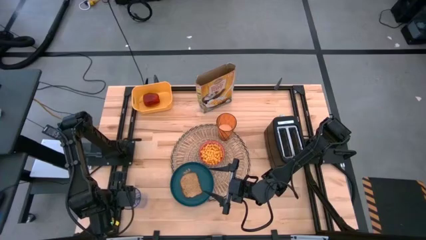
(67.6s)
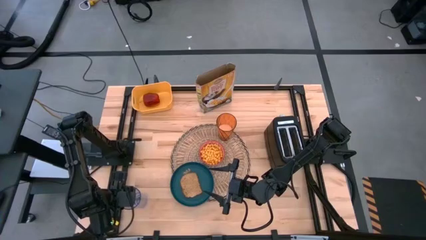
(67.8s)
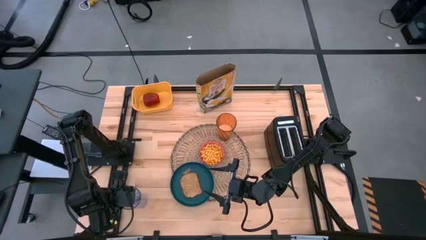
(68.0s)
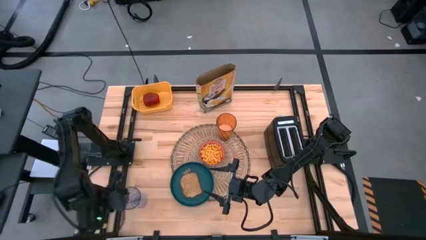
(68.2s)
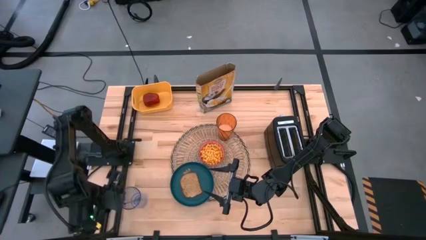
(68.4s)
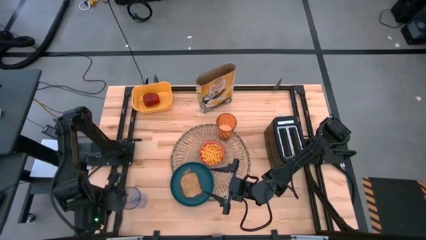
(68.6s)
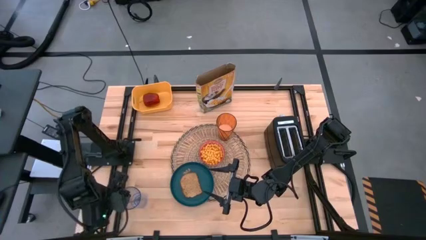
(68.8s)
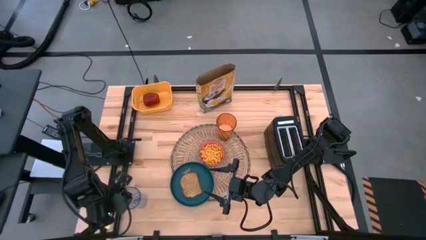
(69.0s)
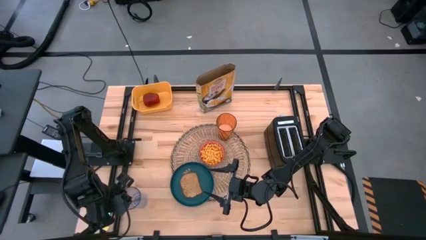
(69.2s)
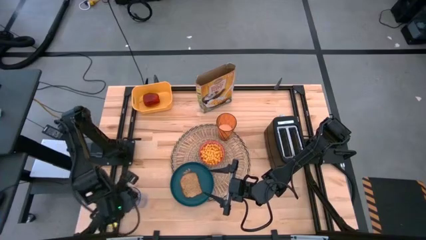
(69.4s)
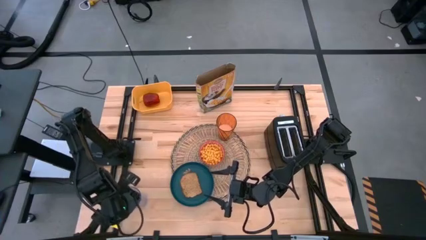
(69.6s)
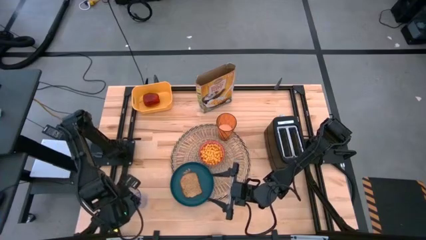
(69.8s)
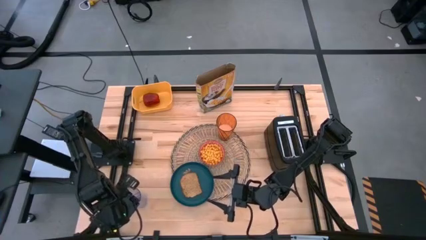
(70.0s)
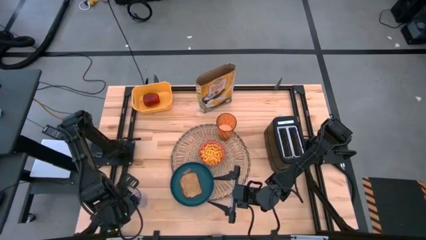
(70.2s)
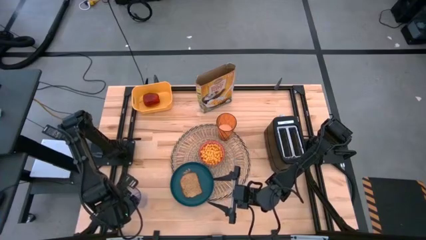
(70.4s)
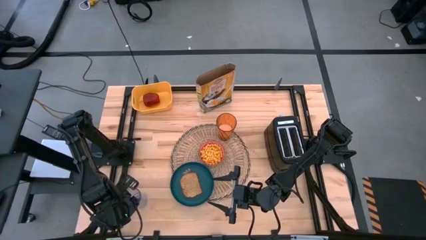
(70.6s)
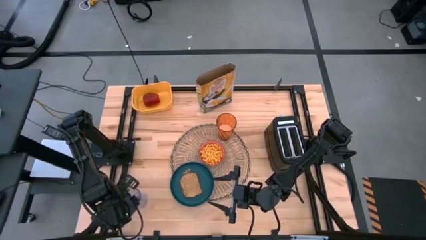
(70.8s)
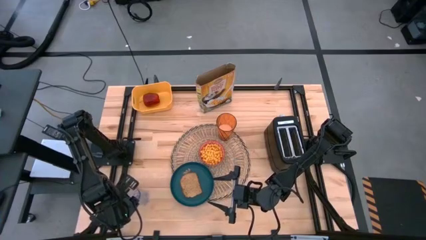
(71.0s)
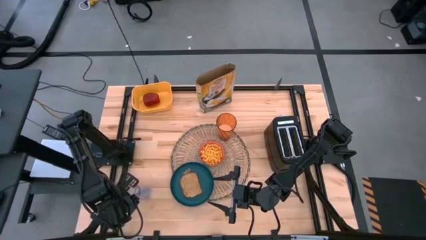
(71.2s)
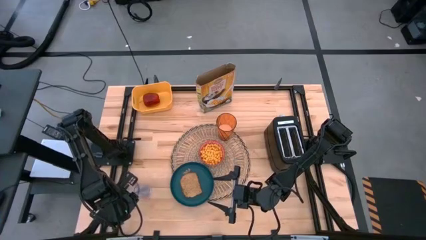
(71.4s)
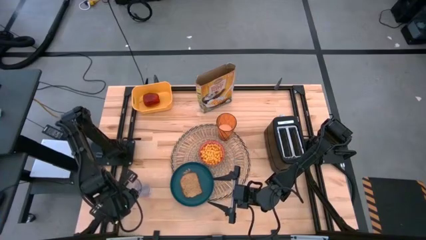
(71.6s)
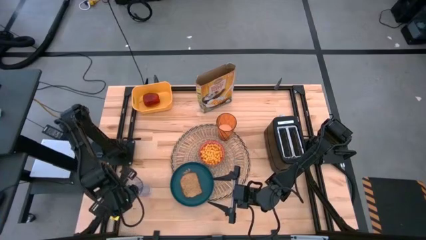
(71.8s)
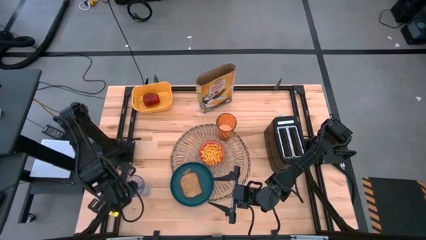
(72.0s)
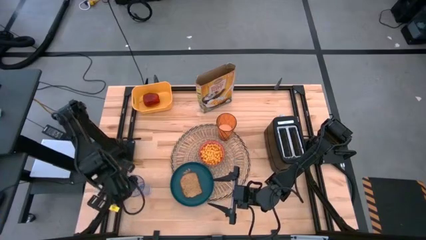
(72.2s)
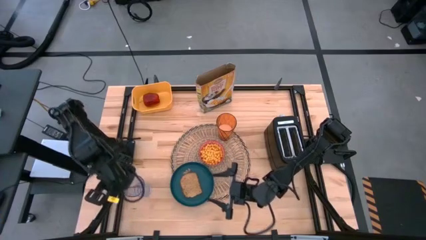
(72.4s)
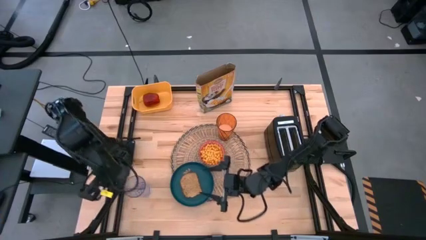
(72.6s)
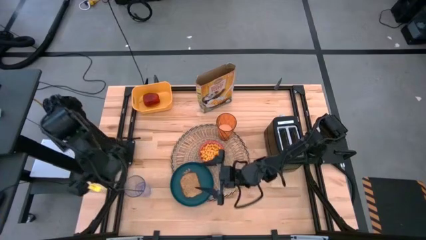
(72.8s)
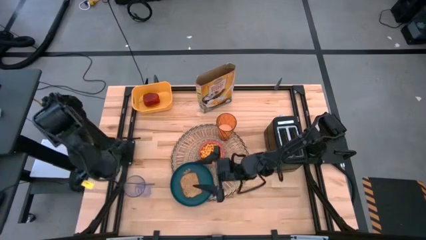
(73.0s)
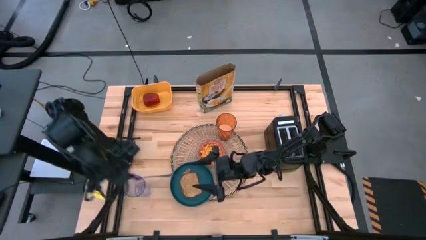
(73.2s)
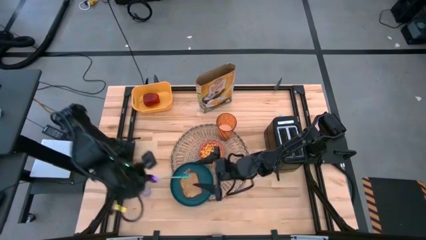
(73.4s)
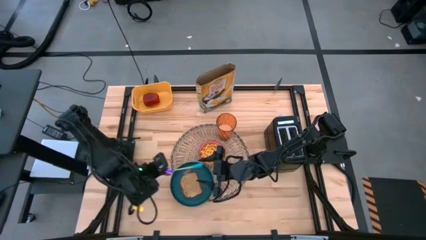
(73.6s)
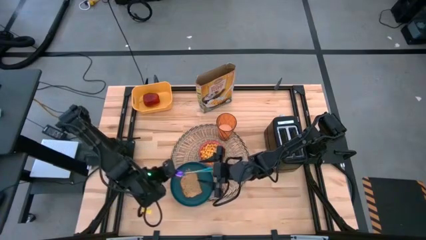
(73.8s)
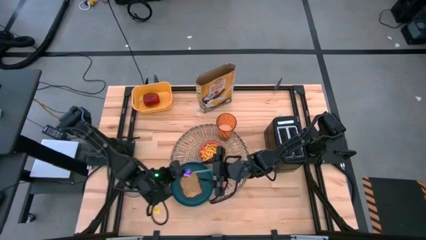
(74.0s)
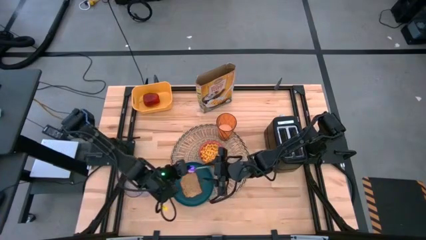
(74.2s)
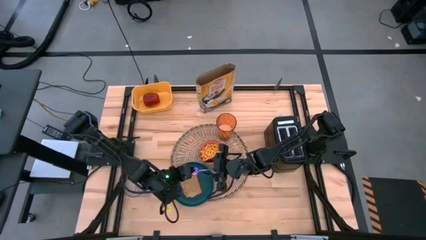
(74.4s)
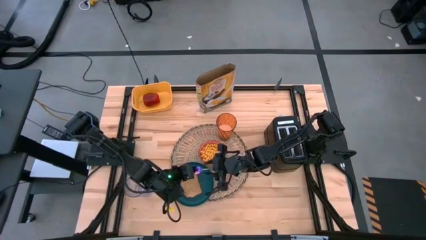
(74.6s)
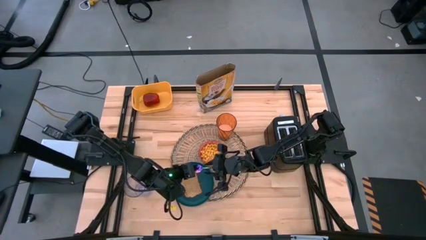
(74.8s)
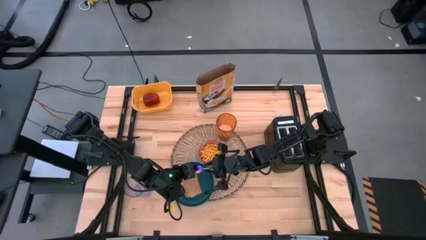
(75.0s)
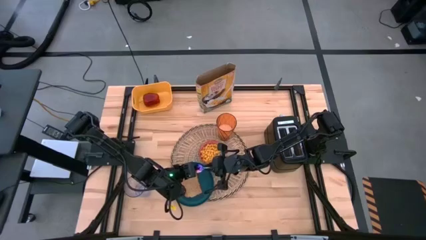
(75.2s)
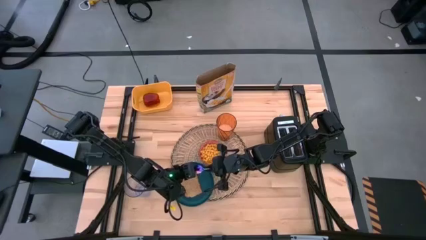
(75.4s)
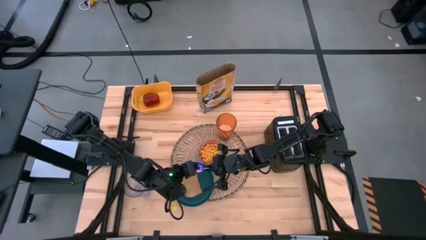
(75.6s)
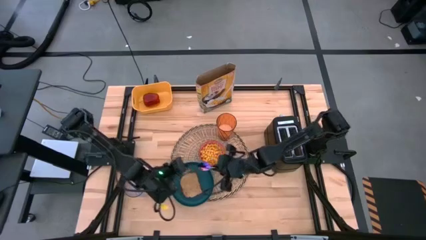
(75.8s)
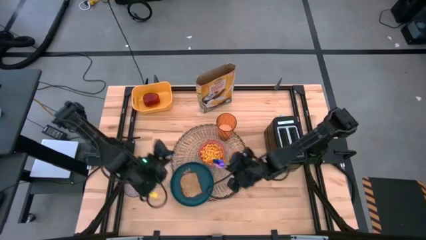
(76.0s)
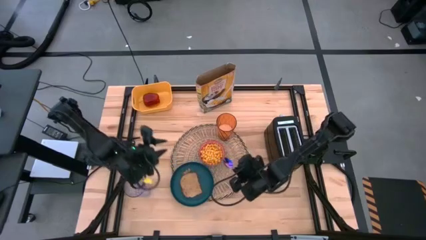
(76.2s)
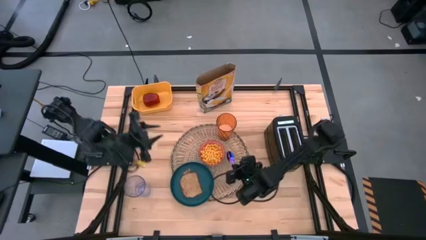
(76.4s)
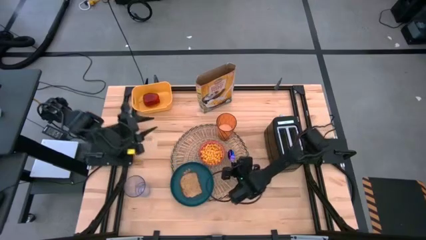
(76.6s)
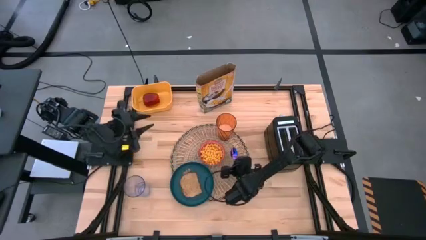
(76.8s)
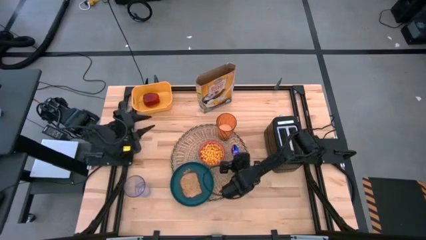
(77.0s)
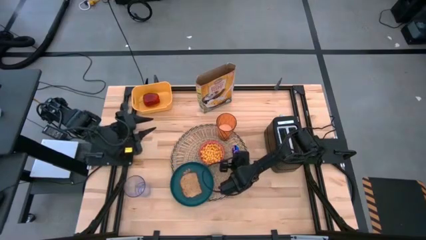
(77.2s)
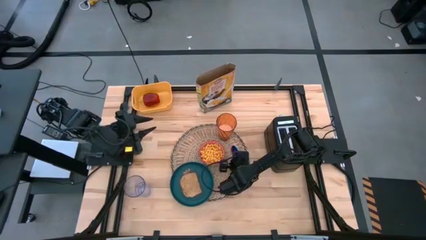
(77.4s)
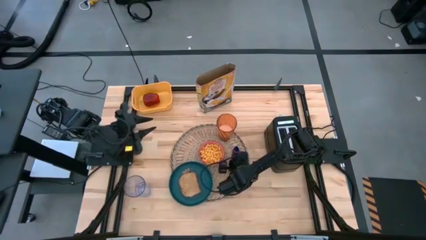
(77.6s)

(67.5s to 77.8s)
Task: Arrange a breakfast setting
Put the violet spoon on the placemat to the right of the red bowl

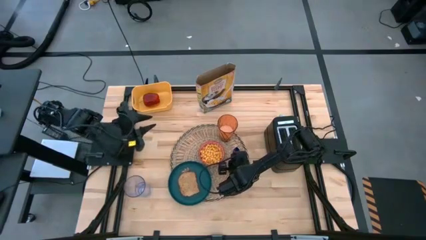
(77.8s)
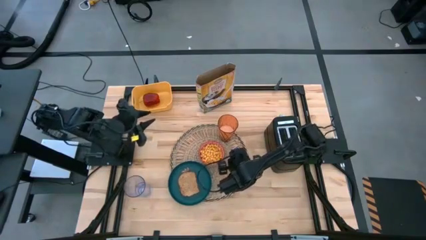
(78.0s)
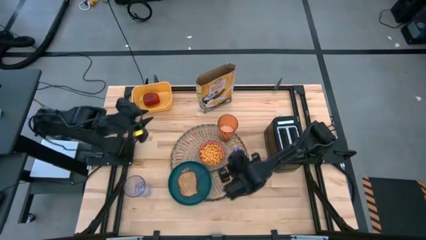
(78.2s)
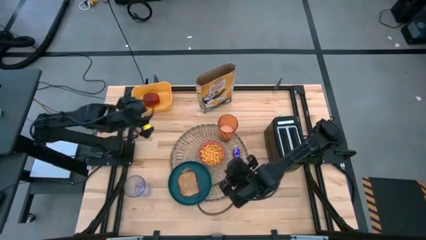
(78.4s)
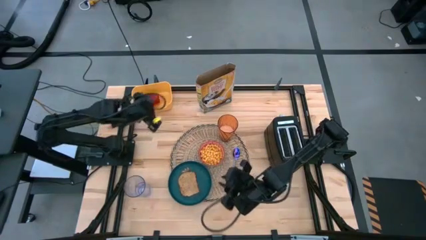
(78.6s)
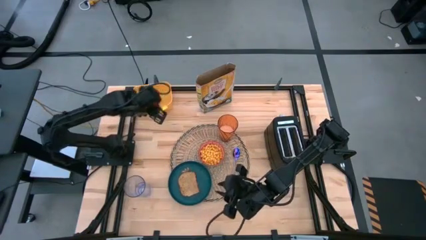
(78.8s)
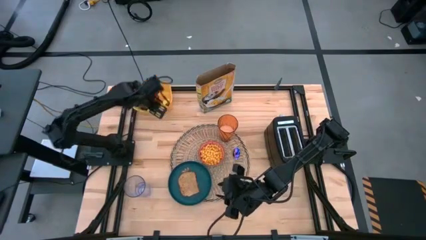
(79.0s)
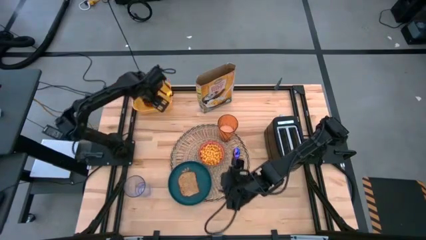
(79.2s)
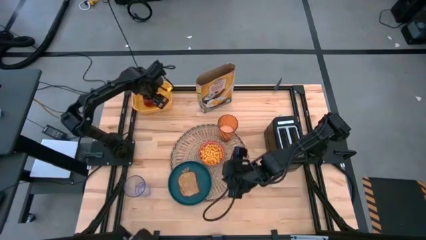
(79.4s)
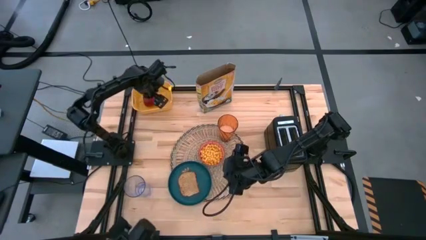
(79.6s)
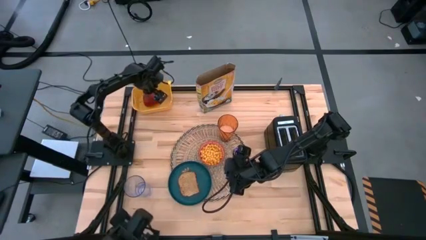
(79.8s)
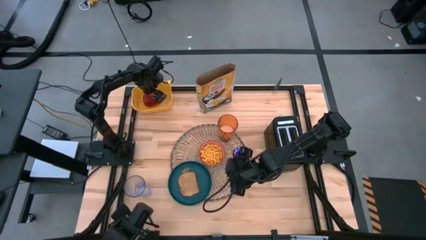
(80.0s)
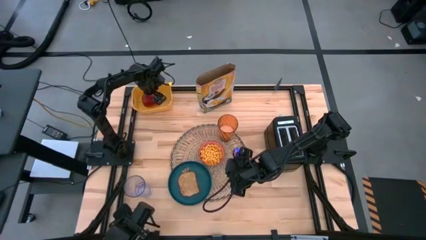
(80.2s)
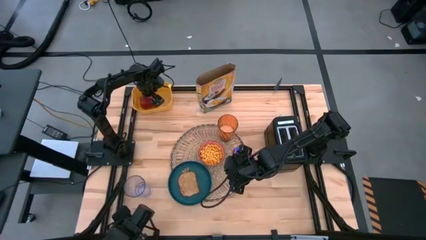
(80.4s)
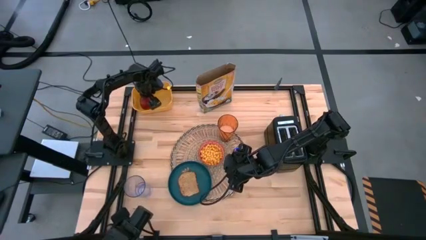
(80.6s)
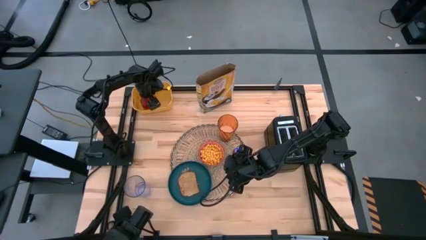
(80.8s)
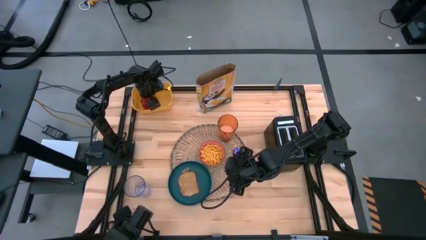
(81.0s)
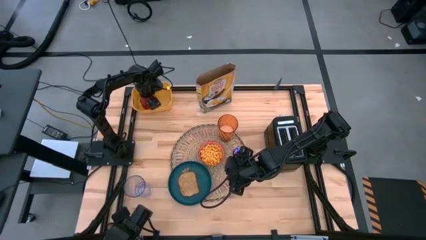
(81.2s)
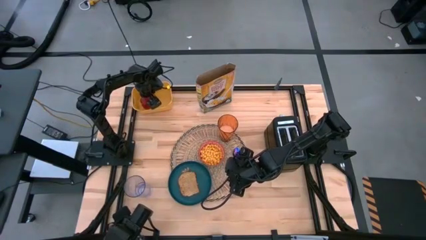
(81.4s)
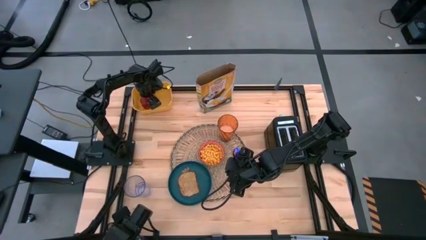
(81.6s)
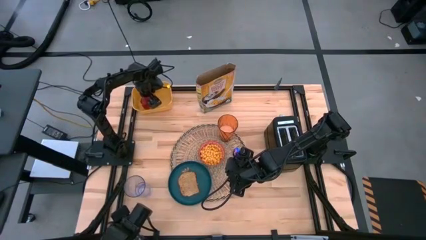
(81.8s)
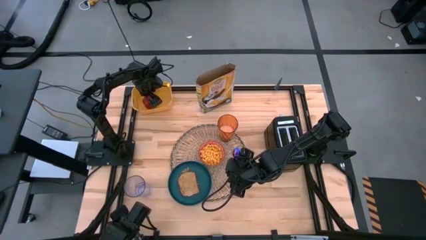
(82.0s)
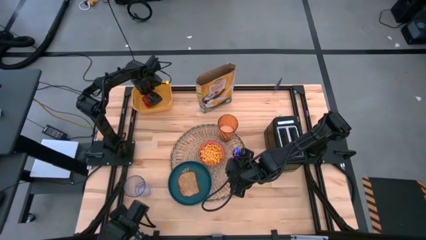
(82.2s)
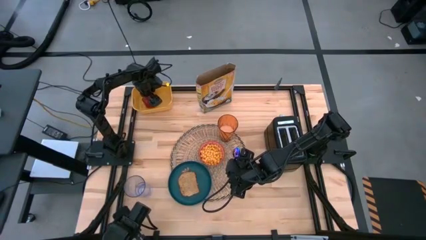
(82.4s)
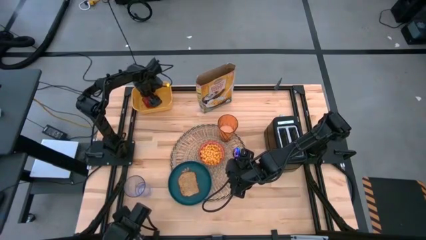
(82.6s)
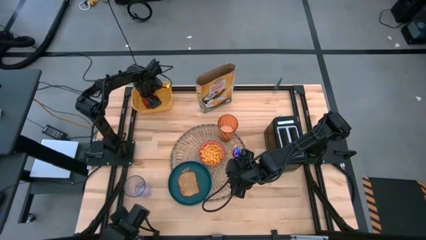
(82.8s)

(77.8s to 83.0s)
Put the red apple on the placemat to the top left of the red bowl
